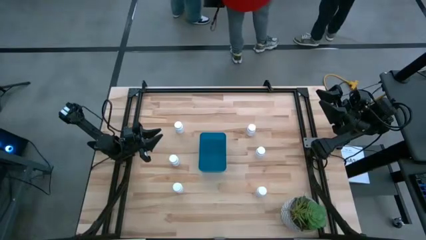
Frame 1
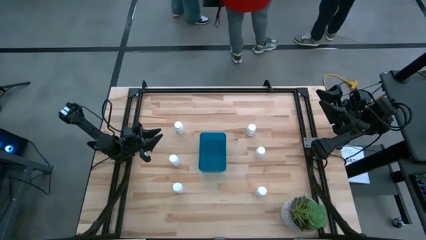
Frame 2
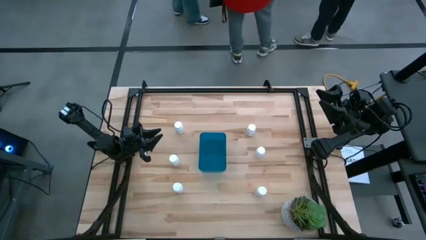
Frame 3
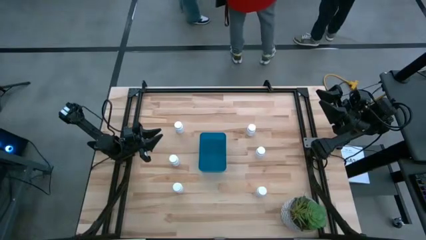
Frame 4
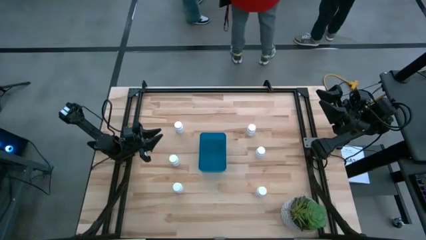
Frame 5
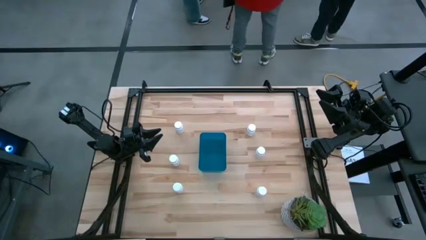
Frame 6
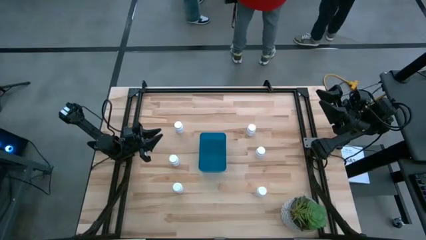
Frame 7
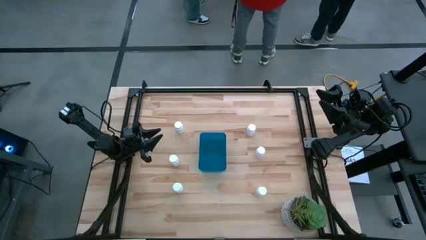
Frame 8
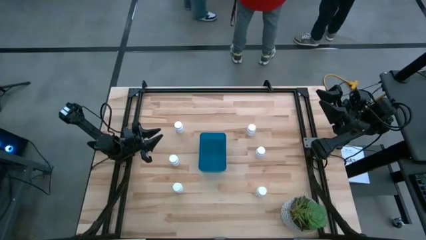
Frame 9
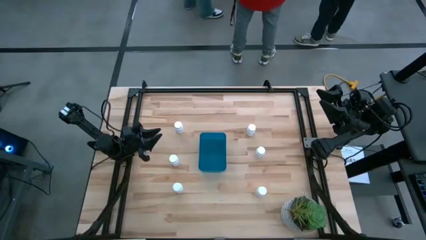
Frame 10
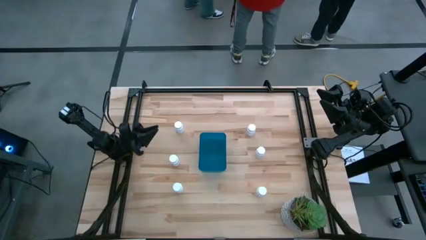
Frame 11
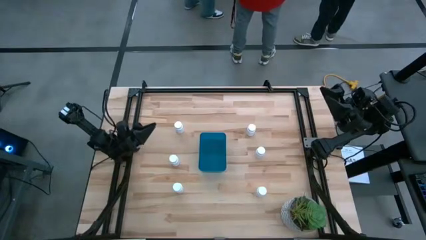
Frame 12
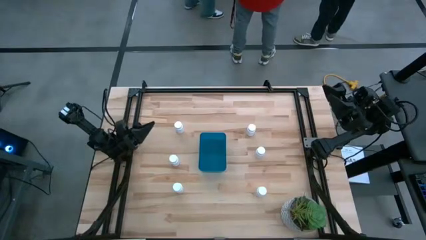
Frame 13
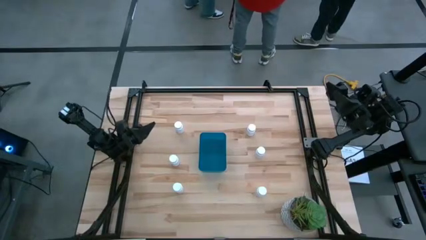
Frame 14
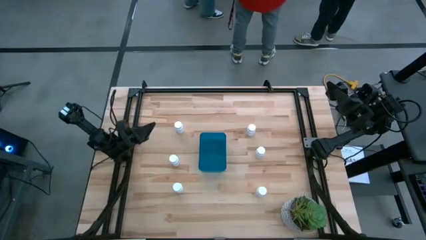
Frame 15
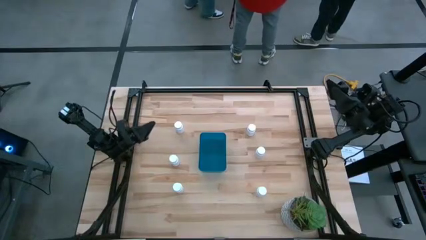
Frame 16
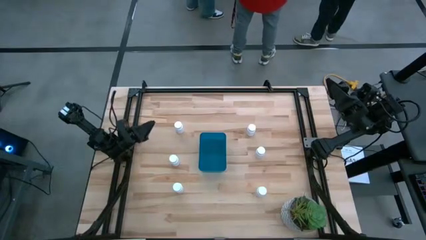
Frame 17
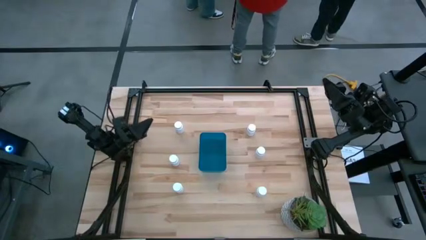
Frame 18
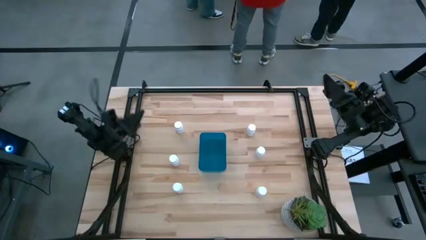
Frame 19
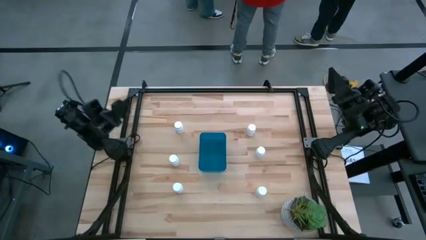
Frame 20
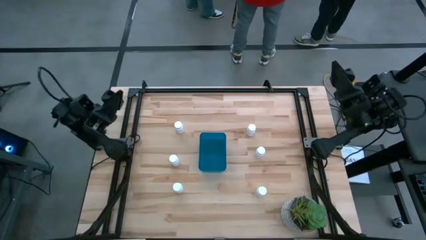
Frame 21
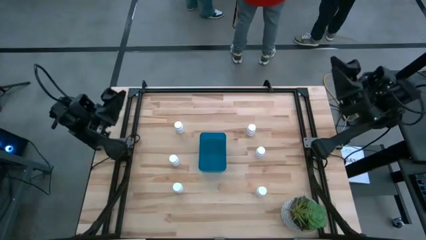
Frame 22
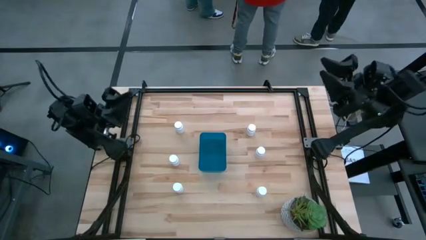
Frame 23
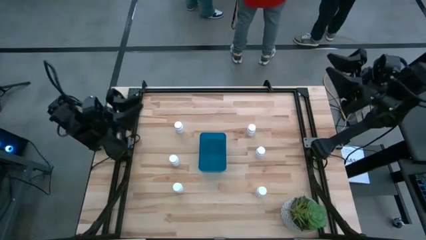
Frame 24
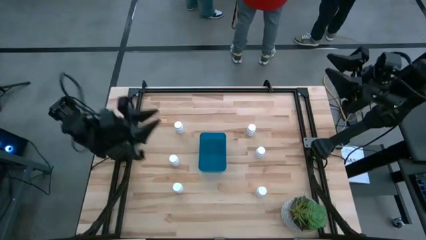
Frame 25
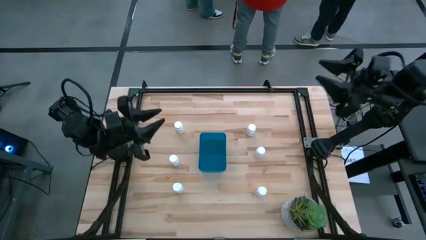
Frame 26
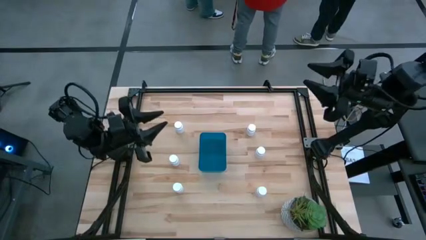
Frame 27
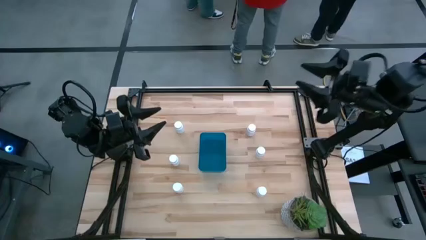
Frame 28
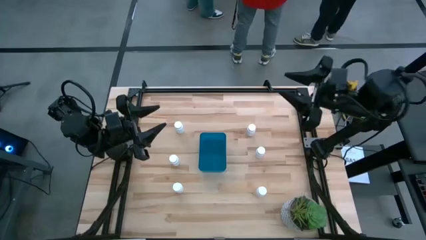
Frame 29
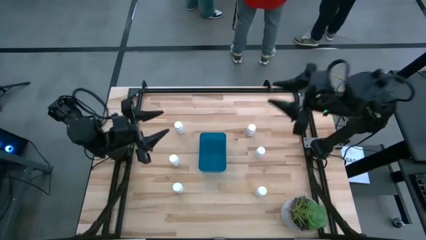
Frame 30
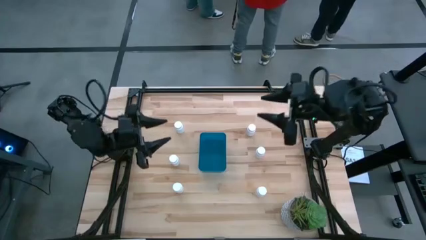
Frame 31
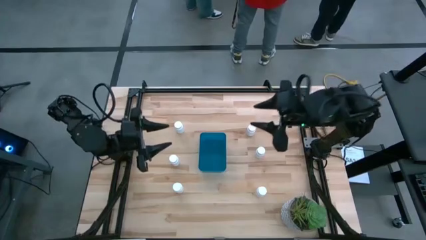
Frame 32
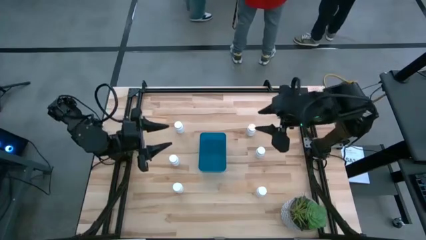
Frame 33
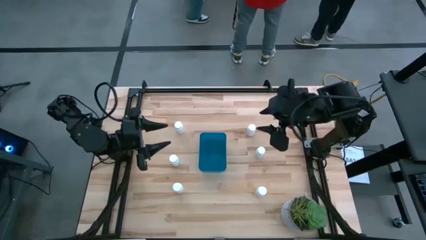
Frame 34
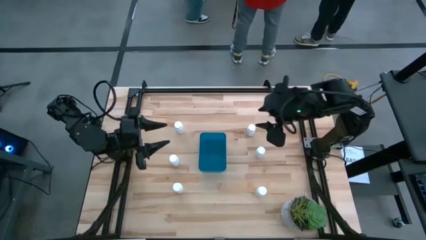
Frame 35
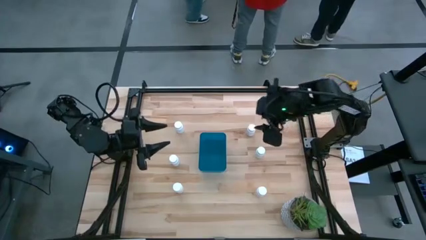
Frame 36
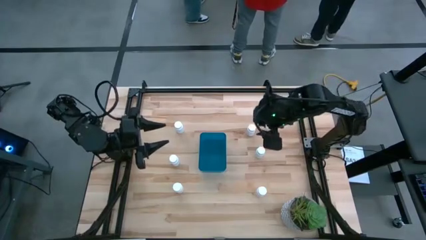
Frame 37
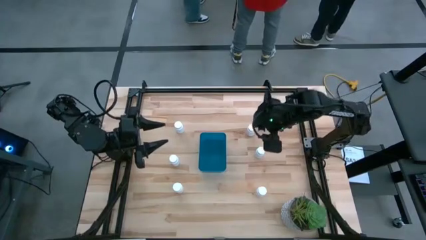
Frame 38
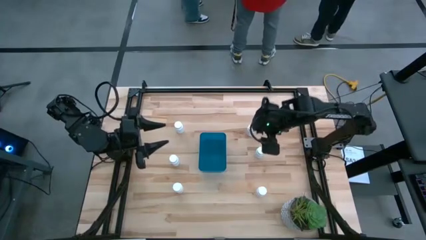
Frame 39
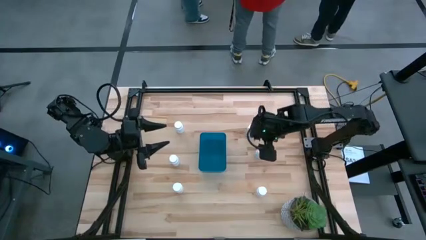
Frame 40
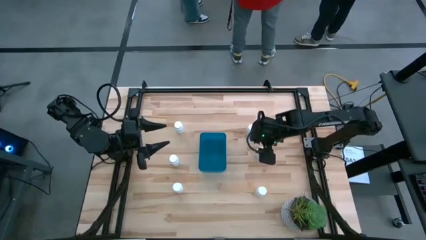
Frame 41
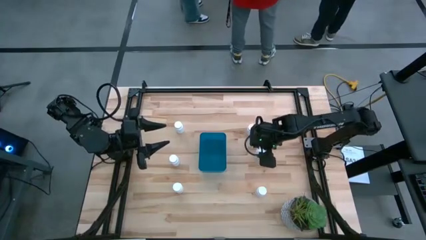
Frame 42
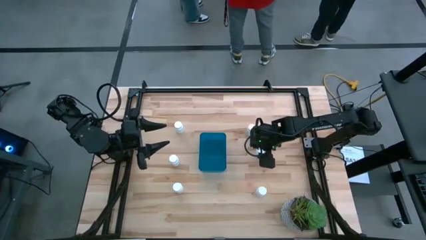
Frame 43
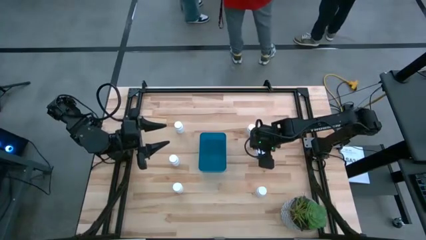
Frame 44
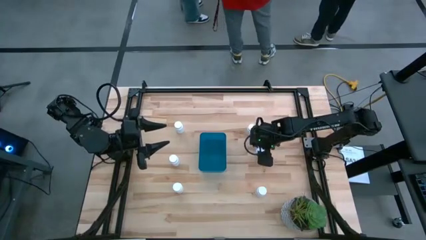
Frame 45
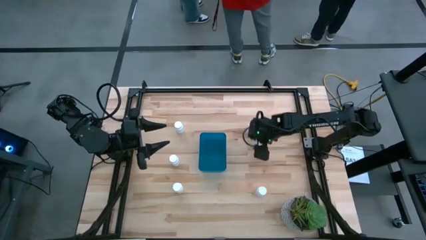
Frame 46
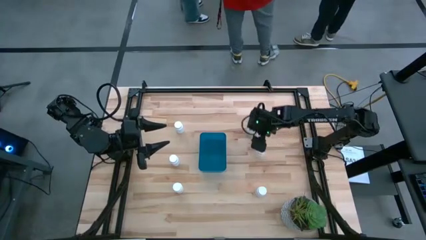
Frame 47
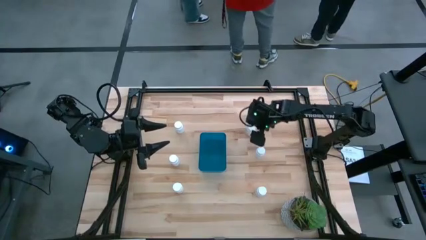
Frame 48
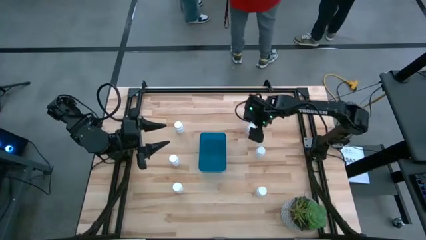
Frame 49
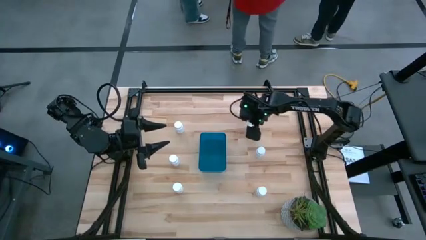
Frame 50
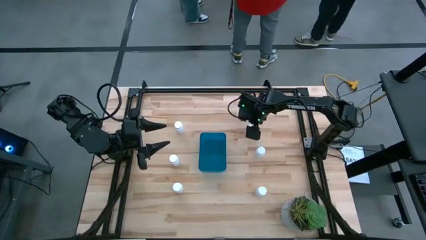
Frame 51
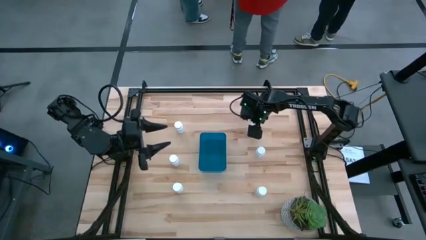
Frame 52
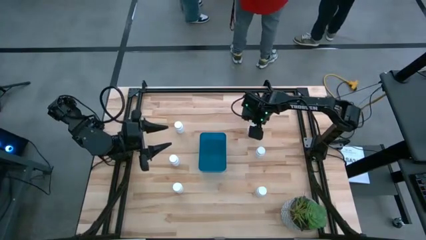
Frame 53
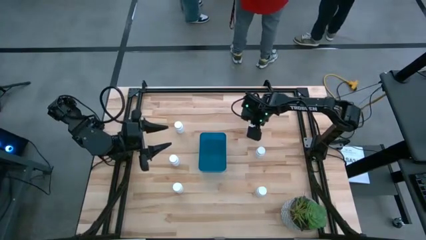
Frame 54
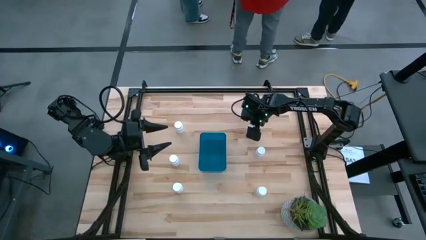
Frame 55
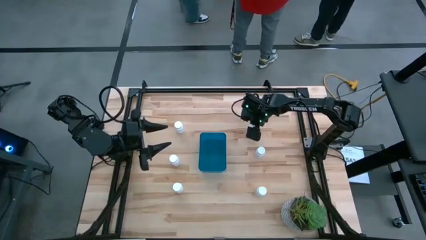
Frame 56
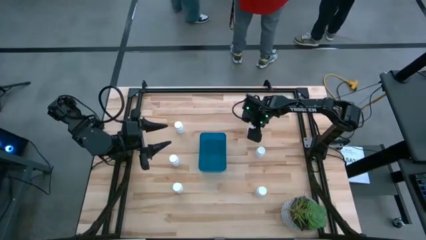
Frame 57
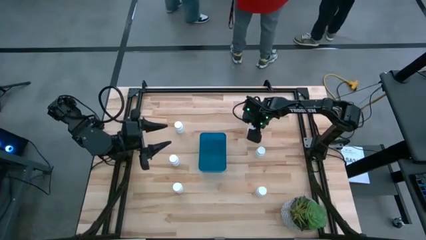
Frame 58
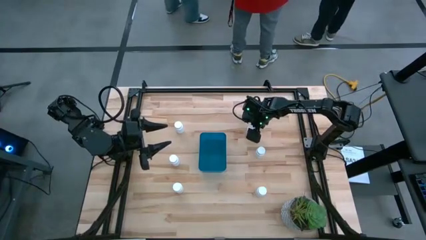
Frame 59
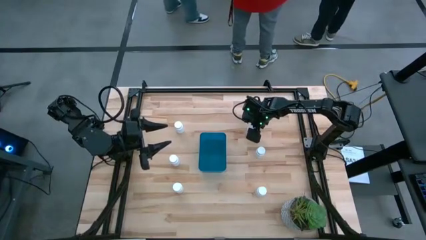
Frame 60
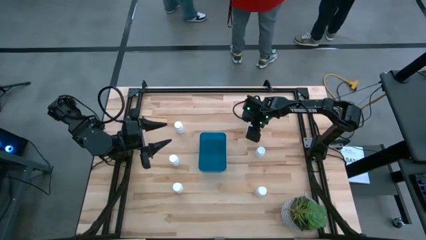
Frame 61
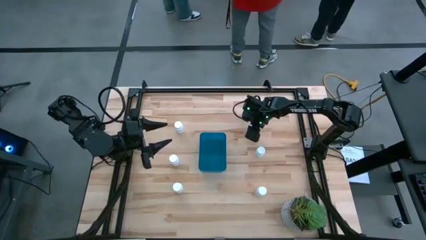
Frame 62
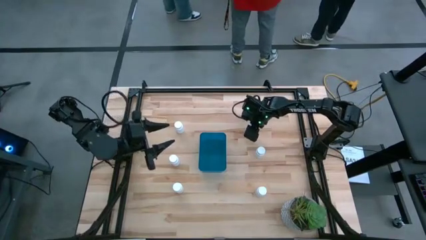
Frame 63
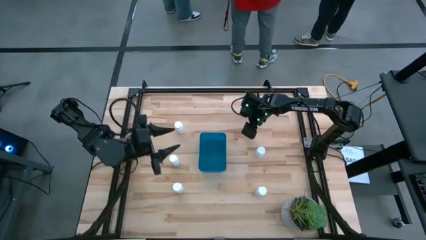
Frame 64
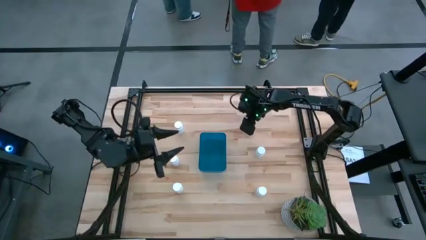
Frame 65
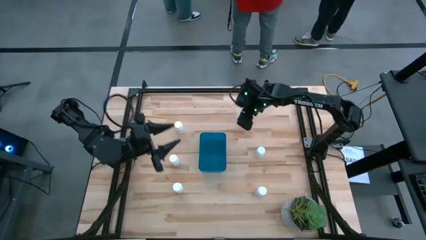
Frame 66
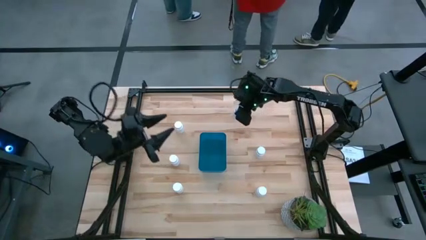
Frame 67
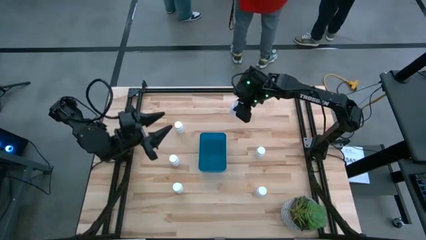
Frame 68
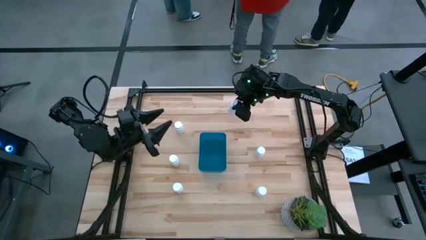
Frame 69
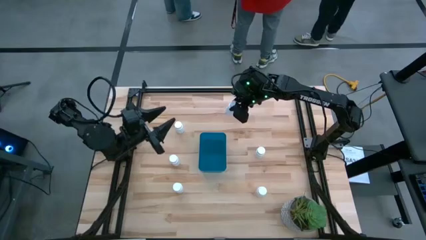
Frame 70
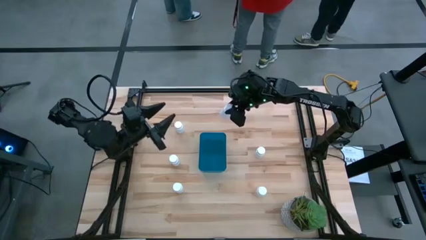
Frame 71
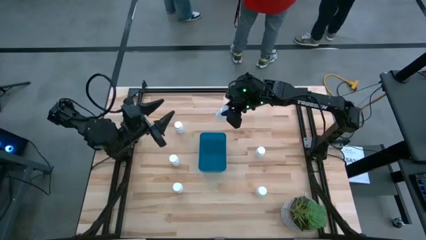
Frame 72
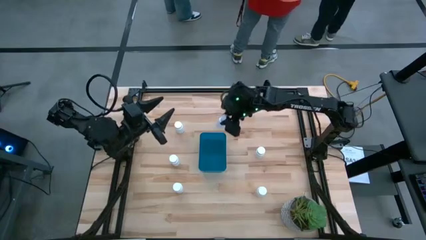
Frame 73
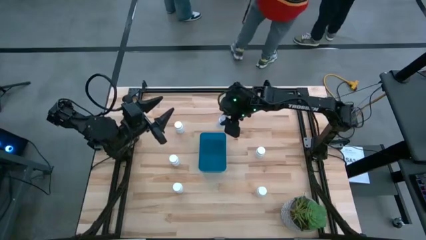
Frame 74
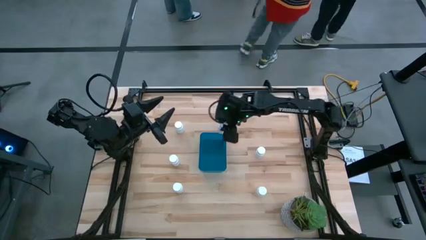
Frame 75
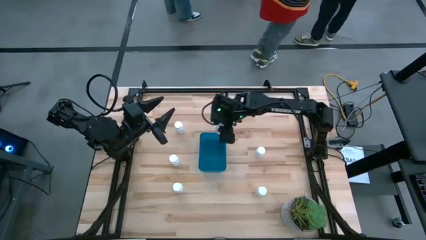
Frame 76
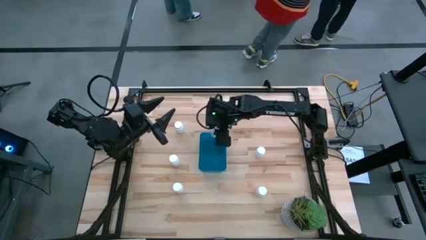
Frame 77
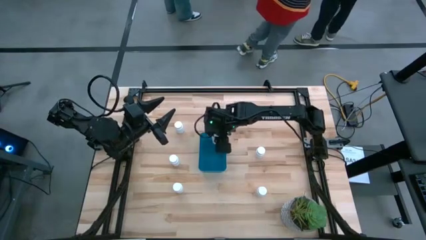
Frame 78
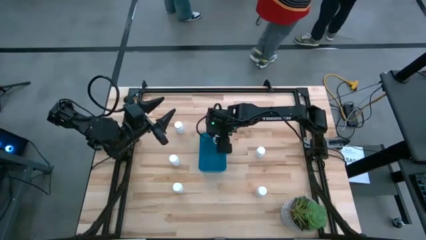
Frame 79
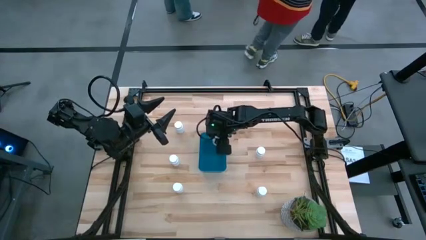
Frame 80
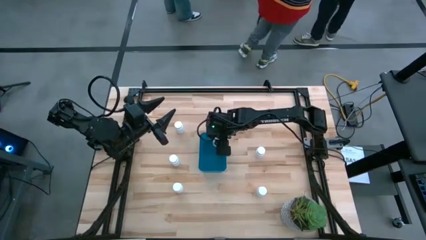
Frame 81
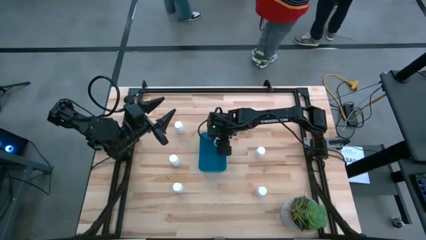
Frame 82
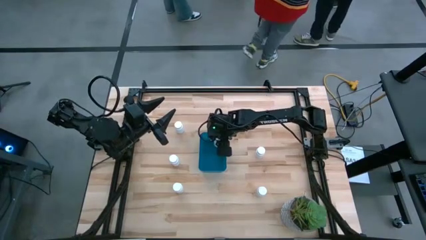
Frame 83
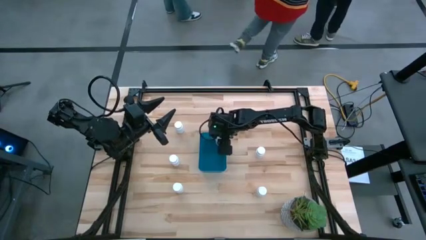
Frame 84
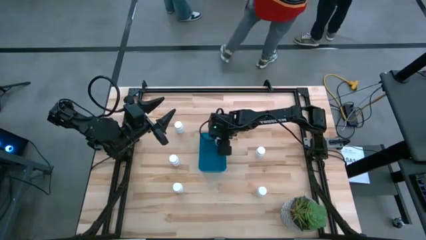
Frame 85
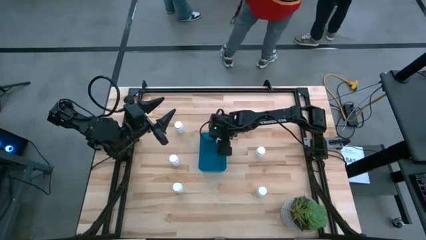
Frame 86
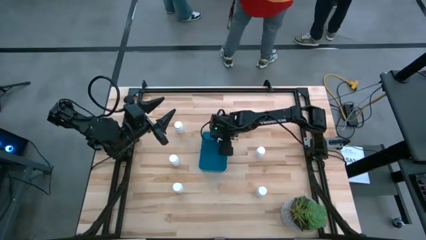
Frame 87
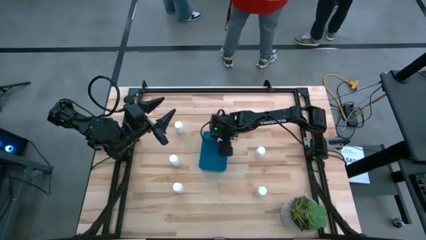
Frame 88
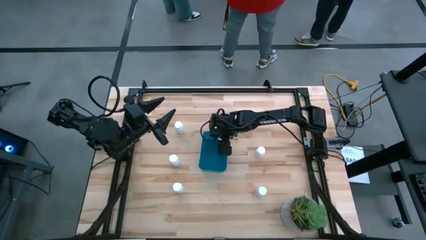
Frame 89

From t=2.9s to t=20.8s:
Task: Pick and place pill bottles into a basket
Put the white medicine bottle into the container
